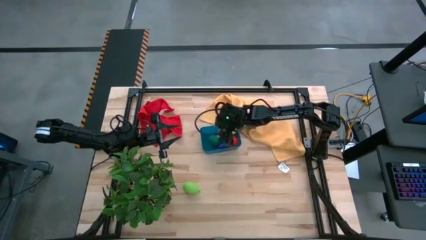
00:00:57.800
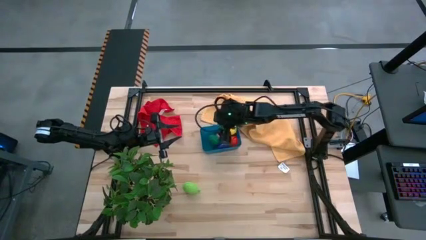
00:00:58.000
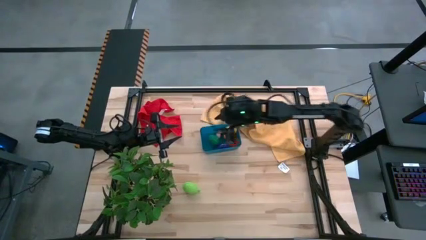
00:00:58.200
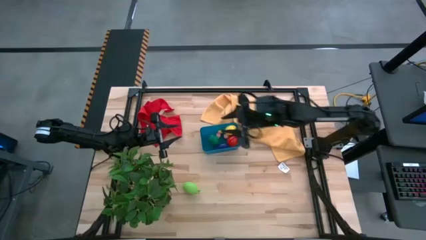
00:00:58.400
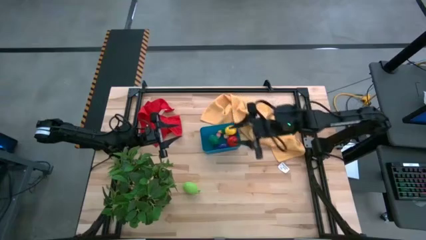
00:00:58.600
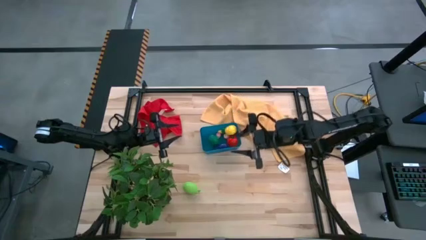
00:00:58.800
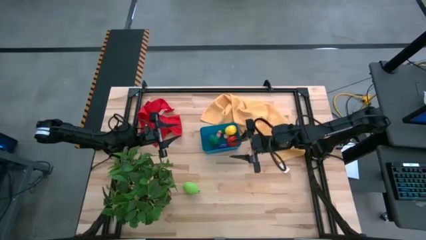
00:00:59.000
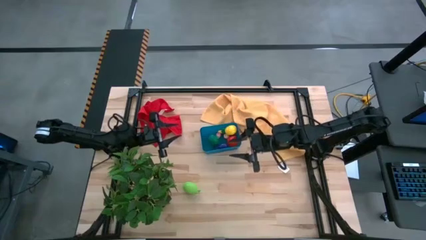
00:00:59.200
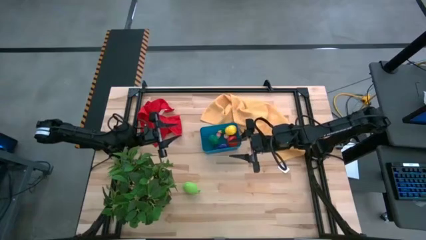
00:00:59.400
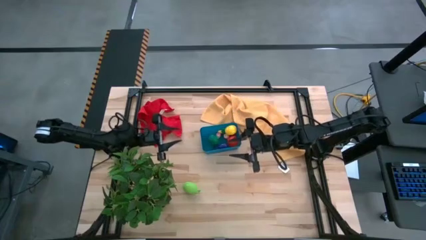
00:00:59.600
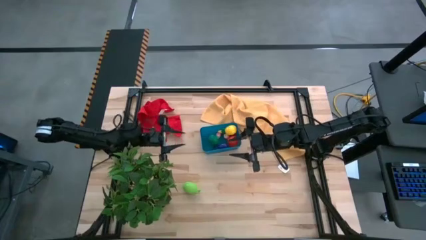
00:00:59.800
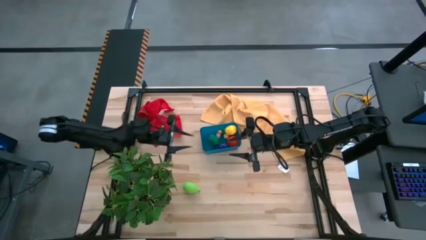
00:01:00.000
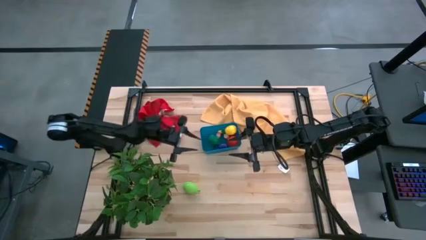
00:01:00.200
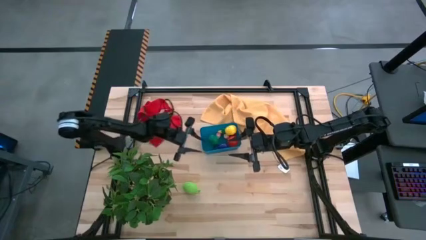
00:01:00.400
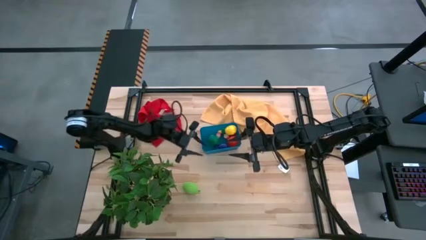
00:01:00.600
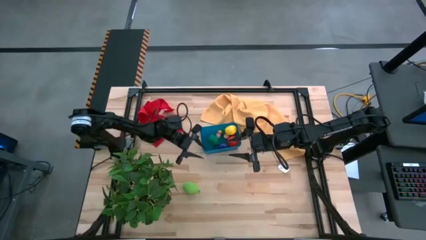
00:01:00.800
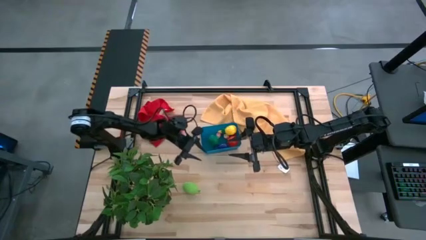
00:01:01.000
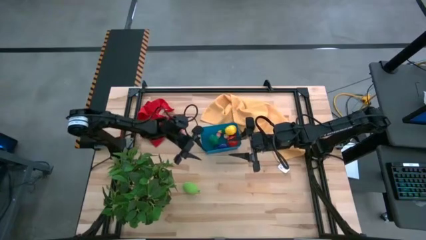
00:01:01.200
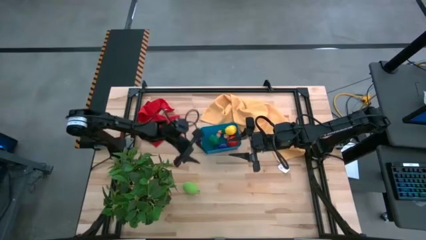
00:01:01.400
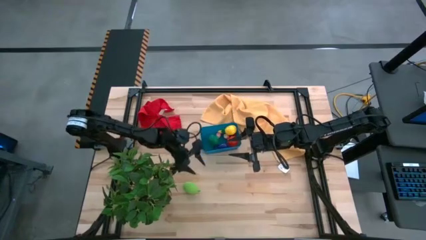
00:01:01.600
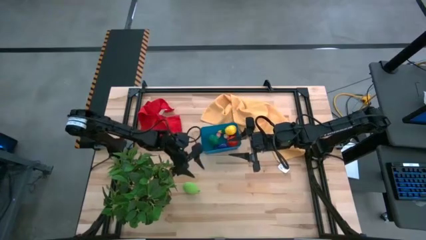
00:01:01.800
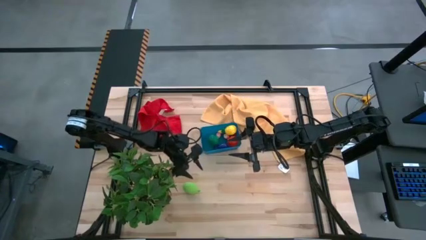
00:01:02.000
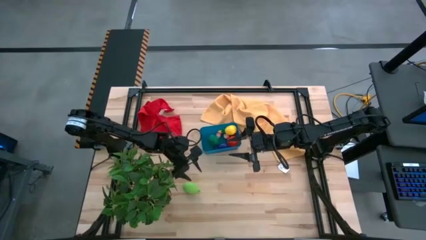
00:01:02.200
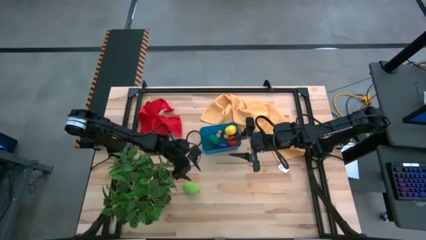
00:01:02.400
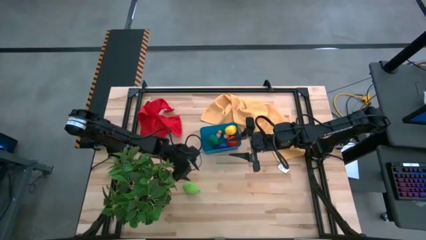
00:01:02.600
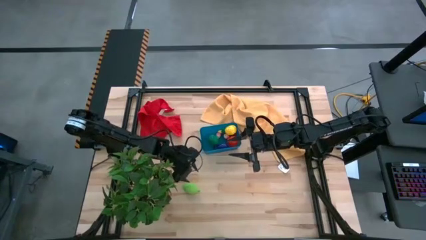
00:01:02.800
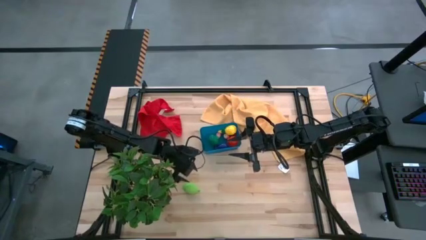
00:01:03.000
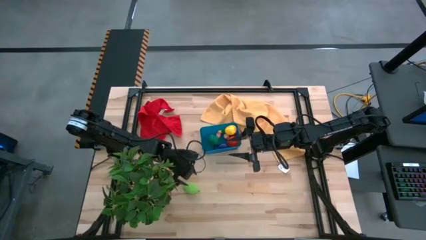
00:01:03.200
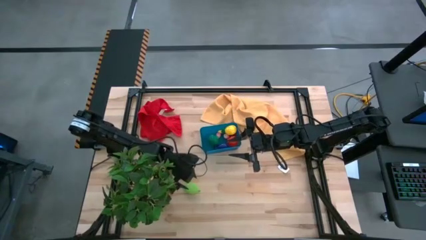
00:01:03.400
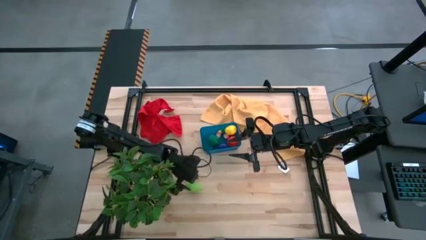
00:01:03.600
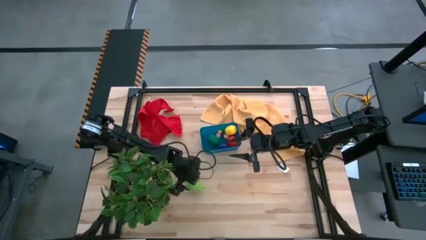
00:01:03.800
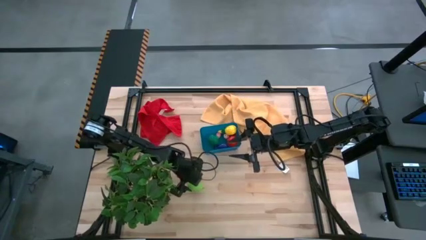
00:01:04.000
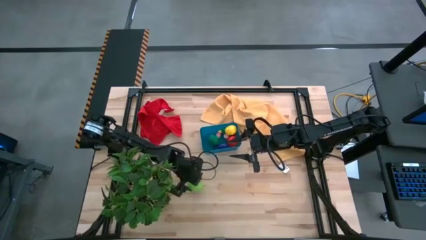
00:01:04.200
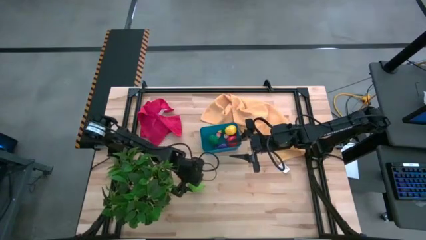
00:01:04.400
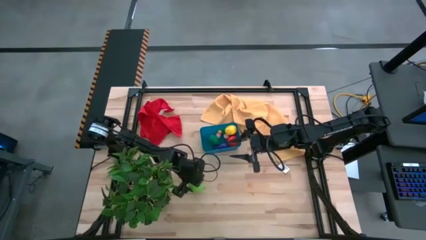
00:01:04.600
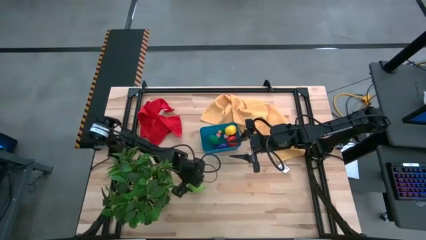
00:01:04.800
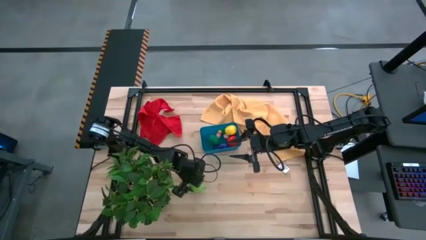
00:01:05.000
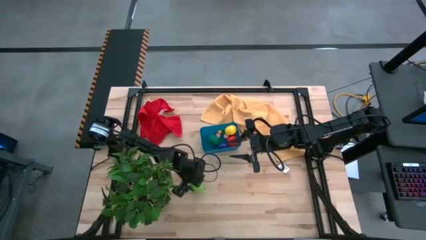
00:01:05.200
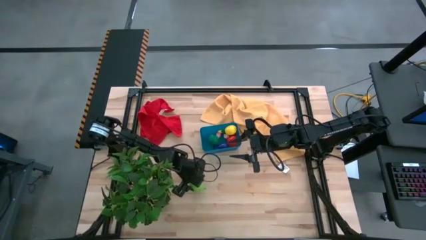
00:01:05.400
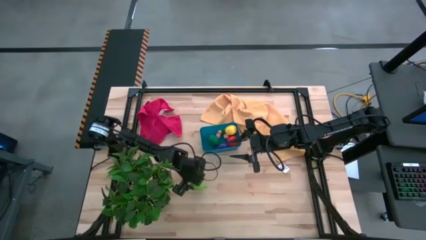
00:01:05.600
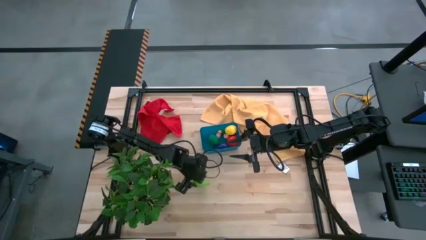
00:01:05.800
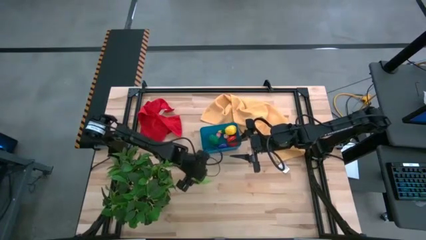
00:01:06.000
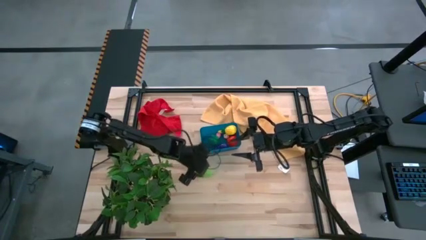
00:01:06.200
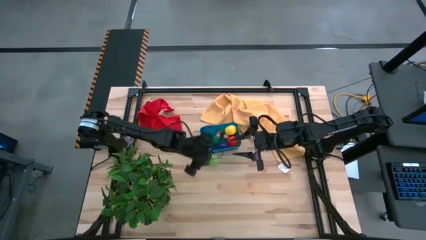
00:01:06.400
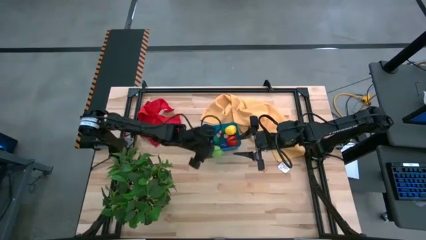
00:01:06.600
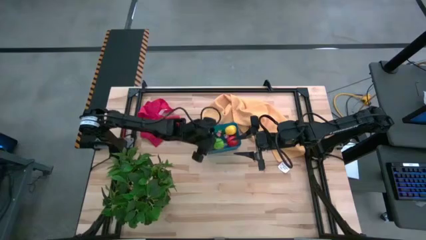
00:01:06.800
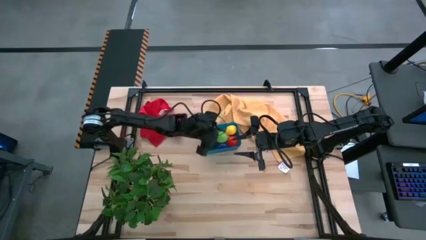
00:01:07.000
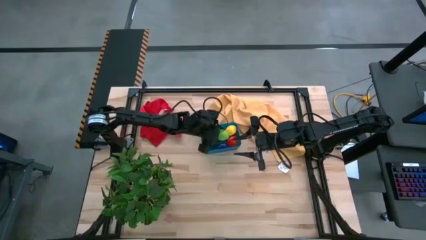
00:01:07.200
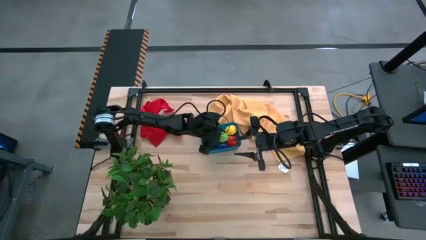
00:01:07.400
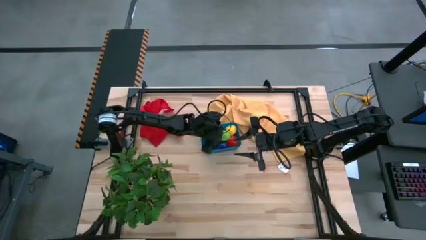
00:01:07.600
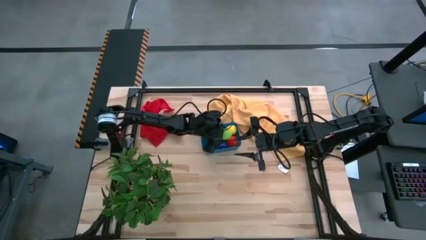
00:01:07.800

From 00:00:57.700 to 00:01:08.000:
Task: Pick and placing Produce into tupperware
Put the green guava into the blue bin

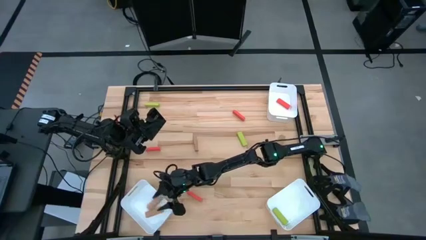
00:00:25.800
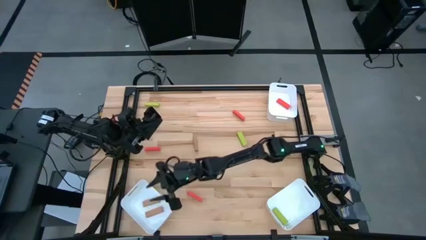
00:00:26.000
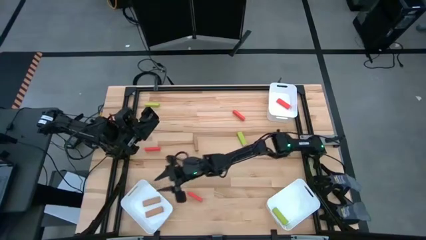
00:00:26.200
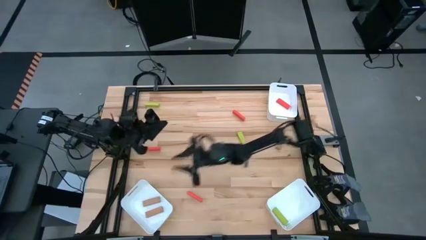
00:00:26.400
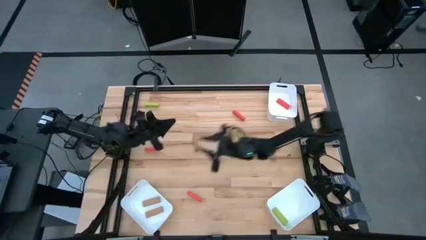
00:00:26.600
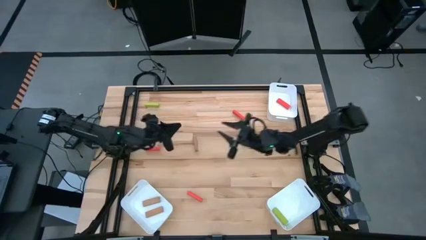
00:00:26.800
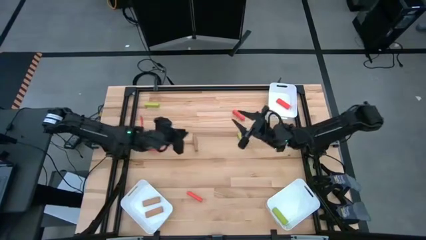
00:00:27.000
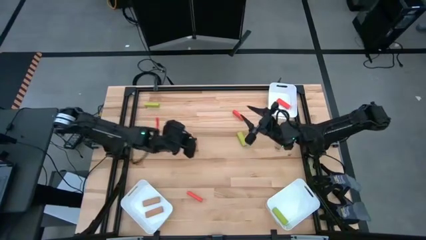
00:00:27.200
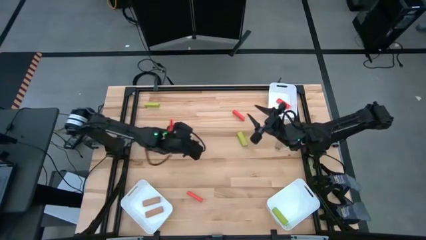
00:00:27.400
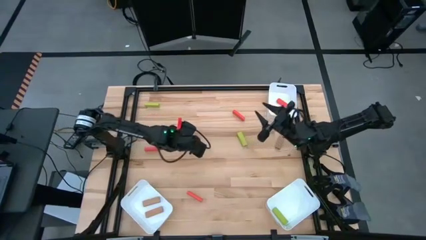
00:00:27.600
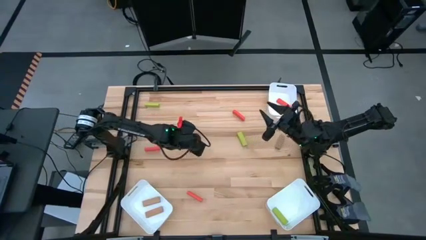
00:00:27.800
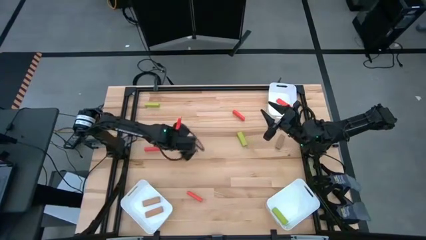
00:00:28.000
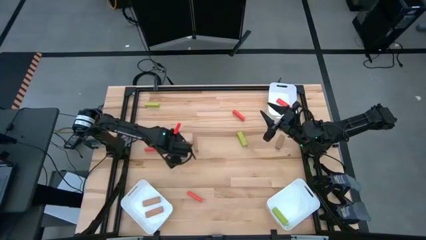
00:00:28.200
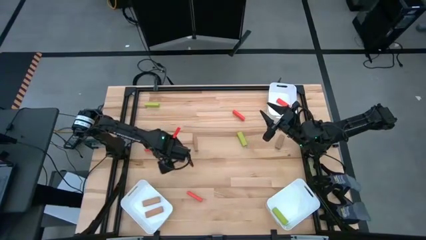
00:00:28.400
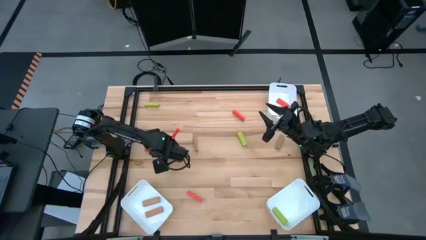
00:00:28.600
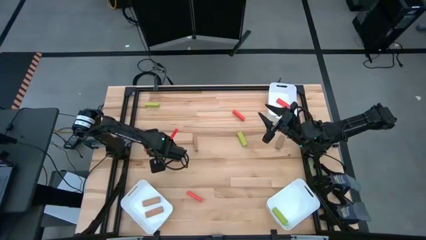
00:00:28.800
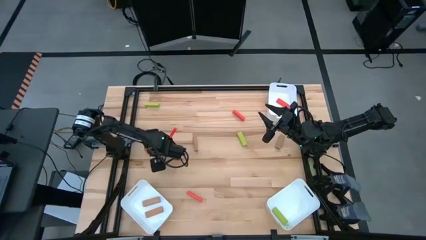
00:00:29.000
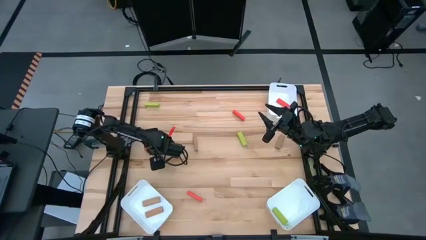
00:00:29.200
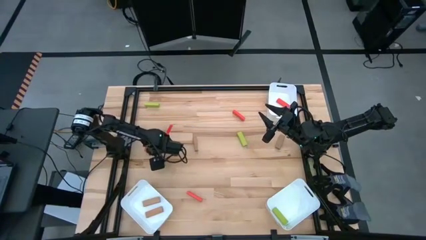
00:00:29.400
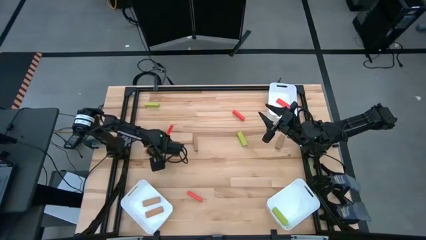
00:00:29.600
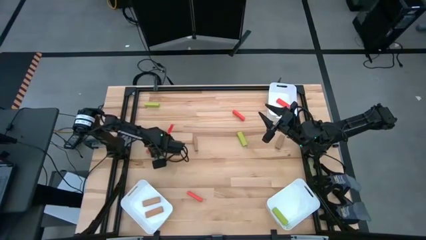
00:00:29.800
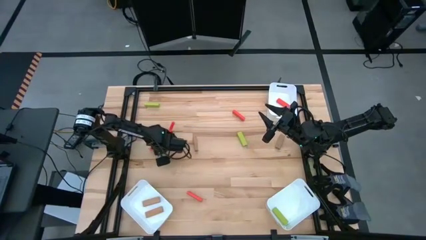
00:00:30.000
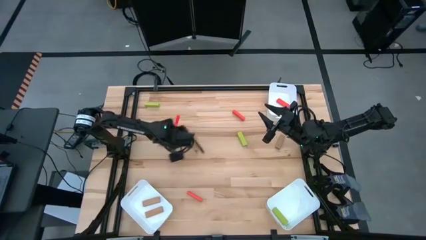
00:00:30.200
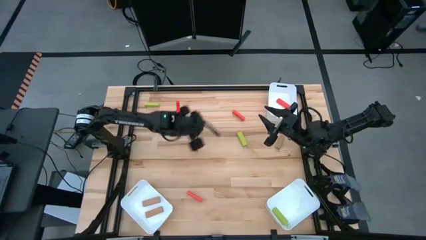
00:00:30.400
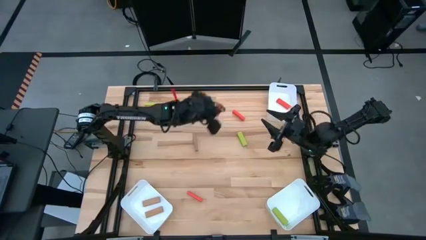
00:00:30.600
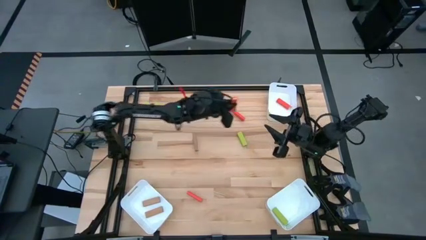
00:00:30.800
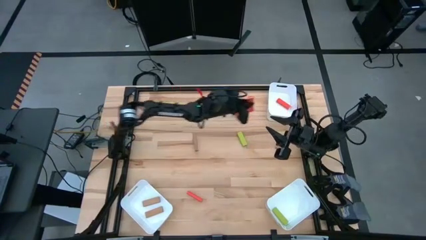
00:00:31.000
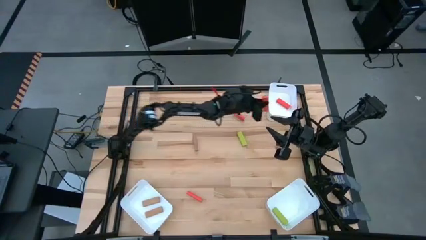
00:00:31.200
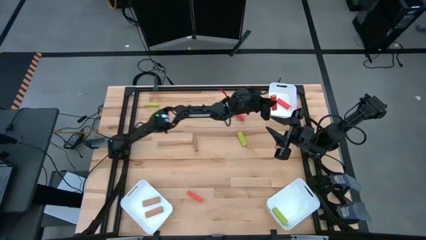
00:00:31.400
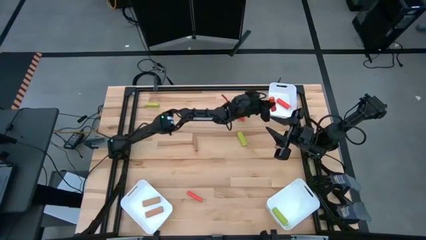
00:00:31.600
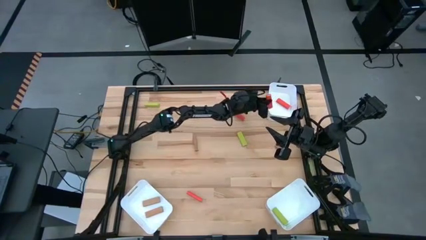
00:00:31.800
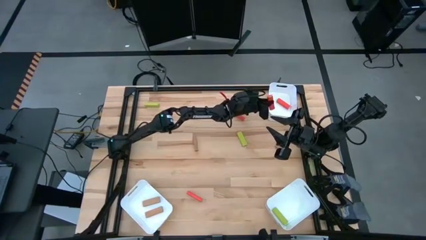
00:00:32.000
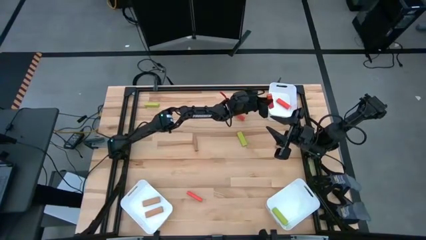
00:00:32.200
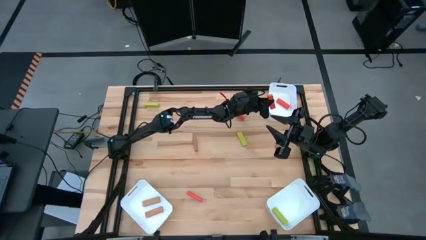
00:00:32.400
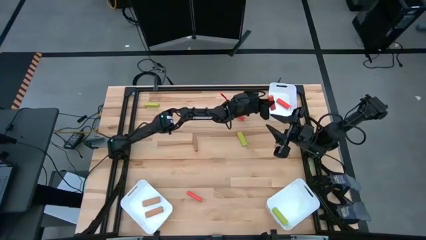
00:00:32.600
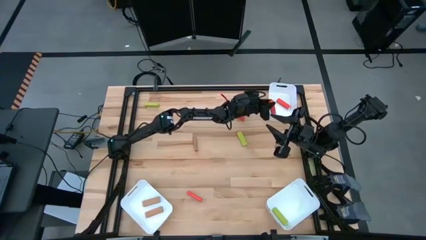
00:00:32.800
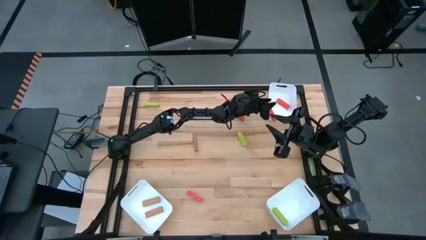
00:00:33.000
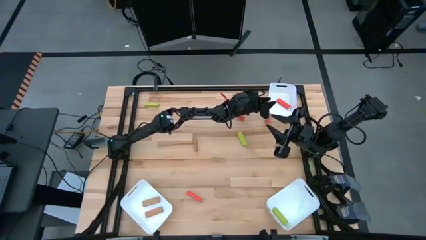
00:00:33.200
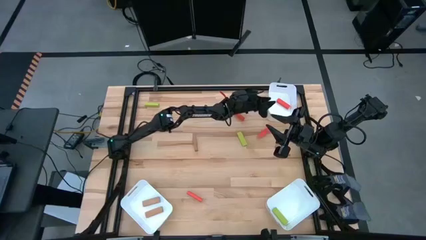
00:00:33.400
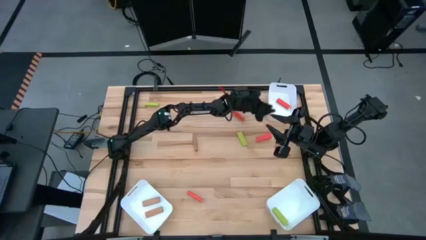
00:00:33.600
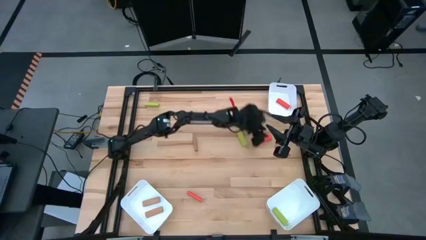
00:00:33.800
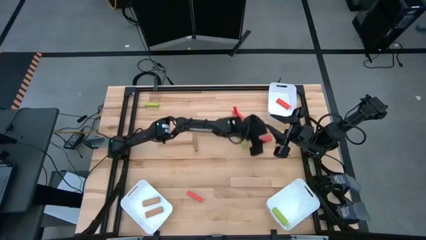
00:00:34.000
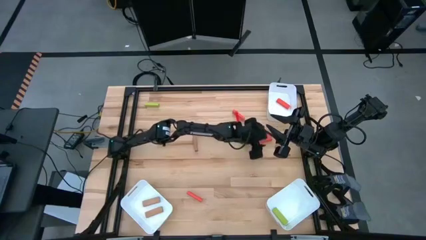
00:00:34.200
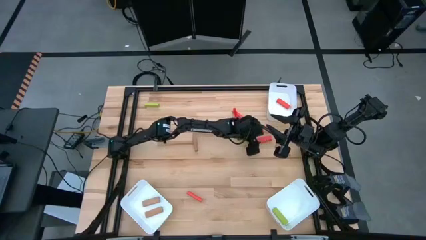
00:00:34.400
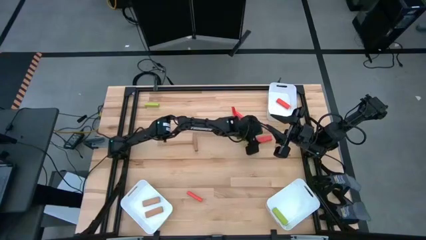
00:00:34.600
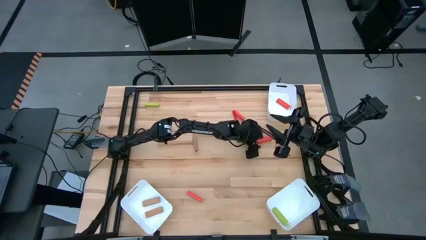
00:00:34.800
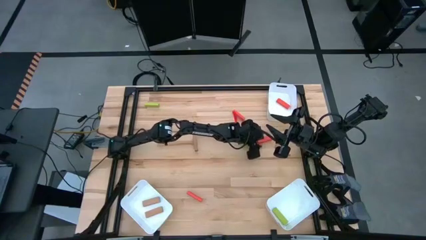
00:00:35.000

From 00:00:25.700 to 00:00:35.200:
Task: Sort blocks
Put the middle orange block into the top right bin
